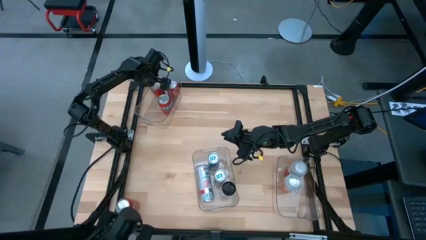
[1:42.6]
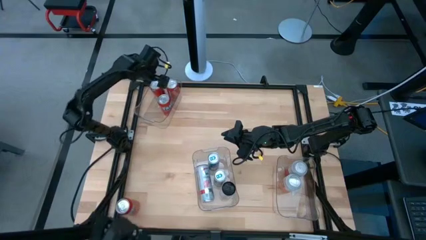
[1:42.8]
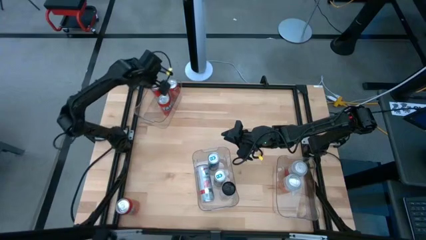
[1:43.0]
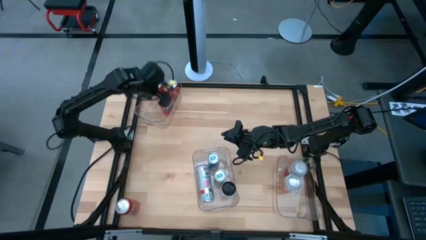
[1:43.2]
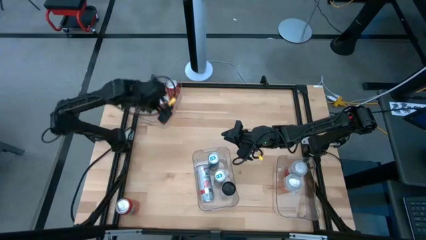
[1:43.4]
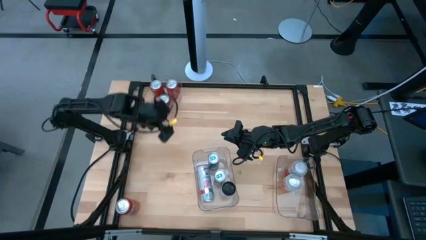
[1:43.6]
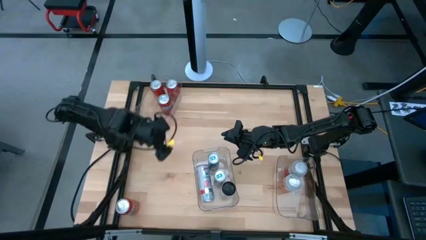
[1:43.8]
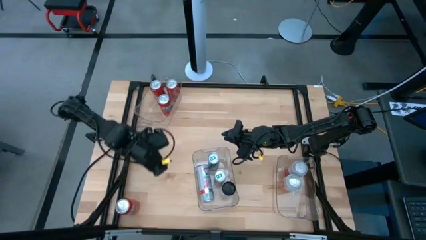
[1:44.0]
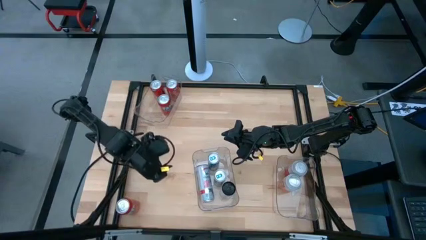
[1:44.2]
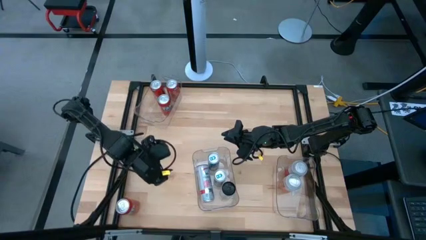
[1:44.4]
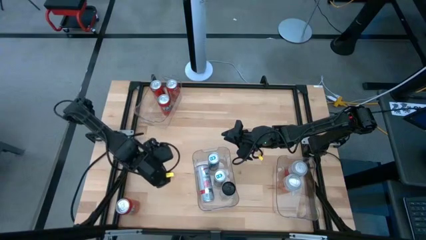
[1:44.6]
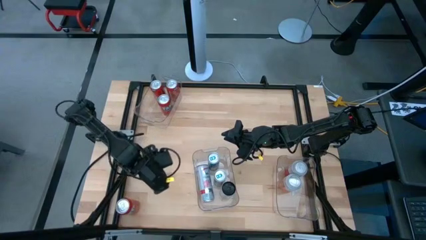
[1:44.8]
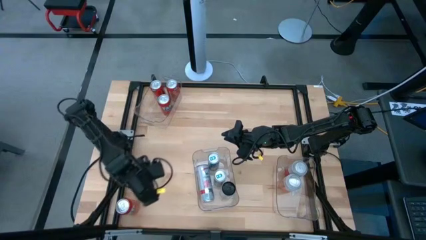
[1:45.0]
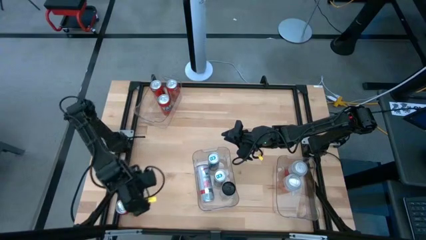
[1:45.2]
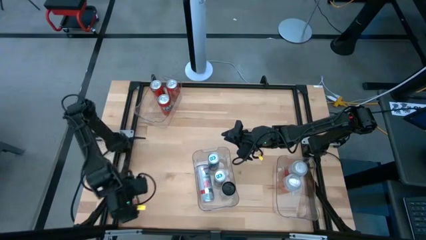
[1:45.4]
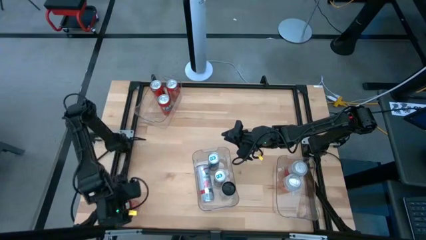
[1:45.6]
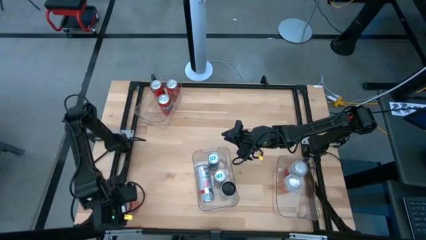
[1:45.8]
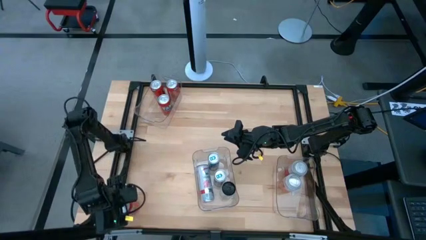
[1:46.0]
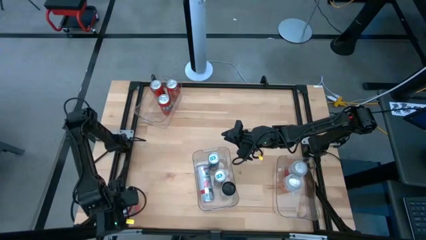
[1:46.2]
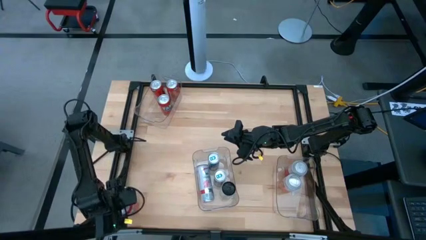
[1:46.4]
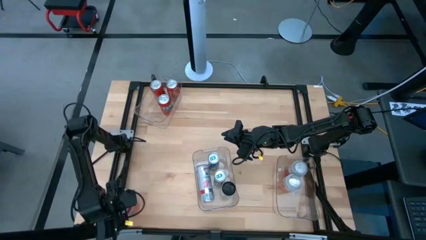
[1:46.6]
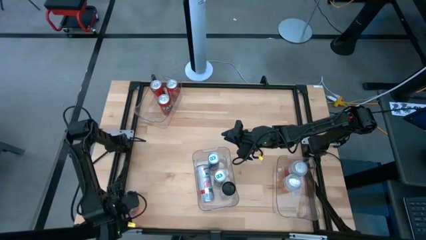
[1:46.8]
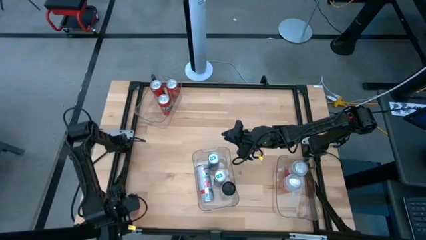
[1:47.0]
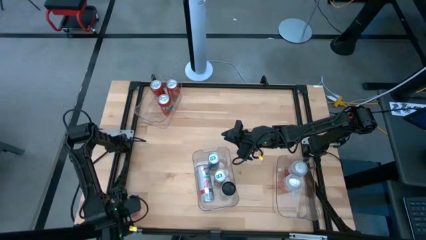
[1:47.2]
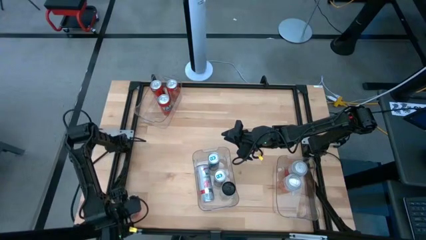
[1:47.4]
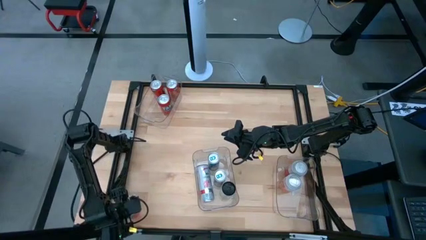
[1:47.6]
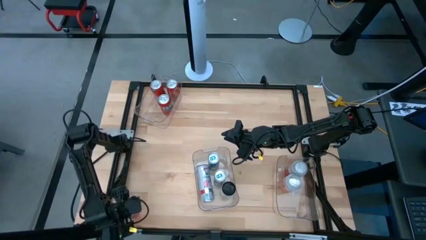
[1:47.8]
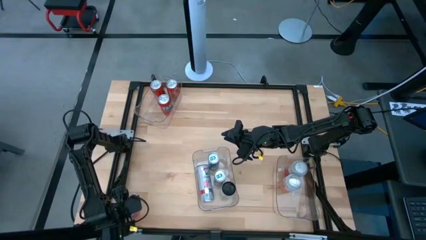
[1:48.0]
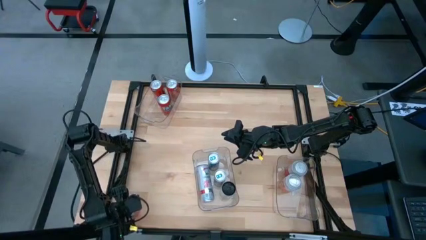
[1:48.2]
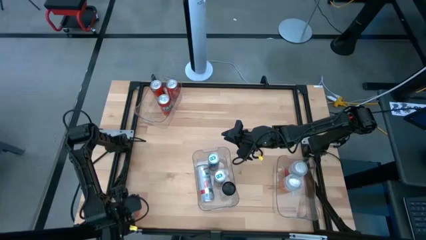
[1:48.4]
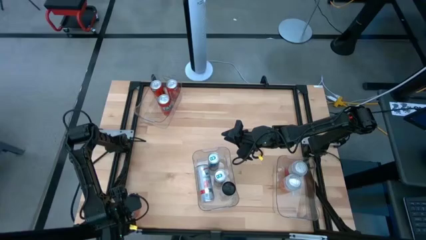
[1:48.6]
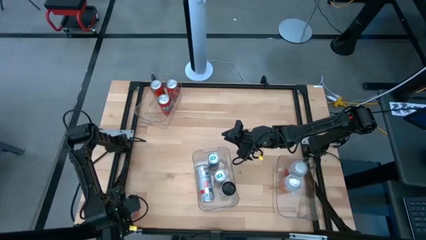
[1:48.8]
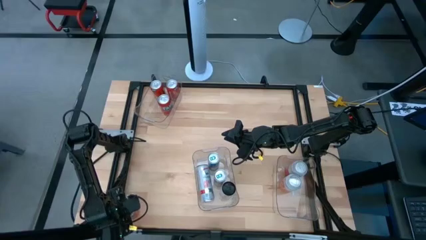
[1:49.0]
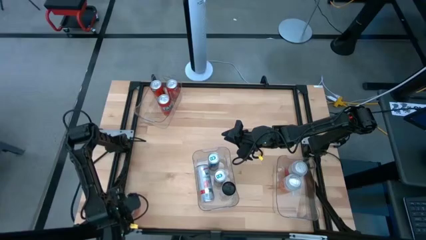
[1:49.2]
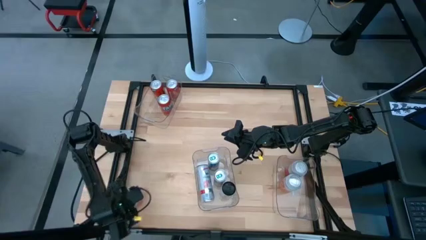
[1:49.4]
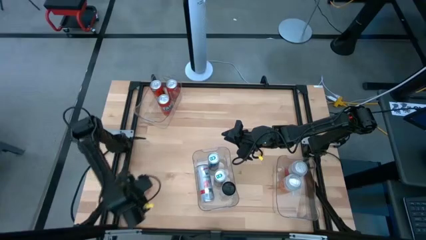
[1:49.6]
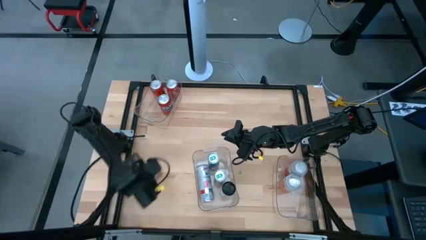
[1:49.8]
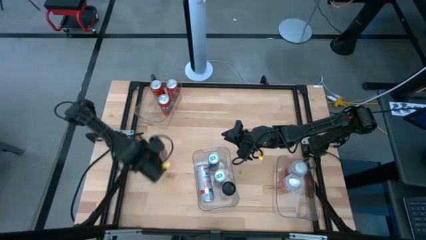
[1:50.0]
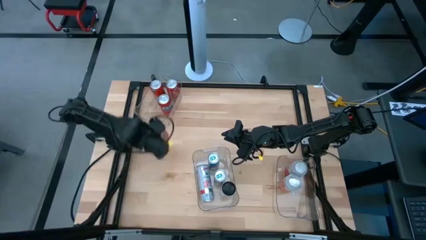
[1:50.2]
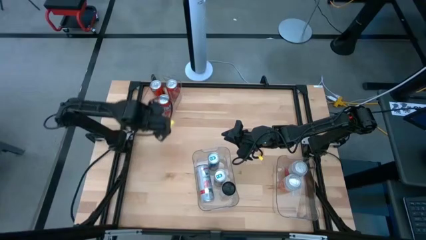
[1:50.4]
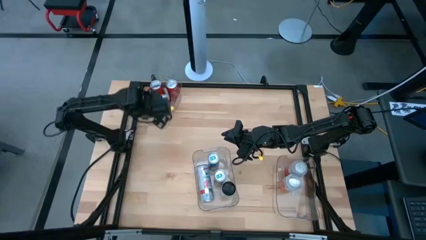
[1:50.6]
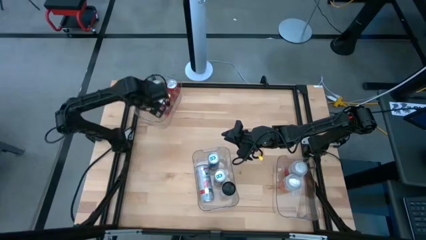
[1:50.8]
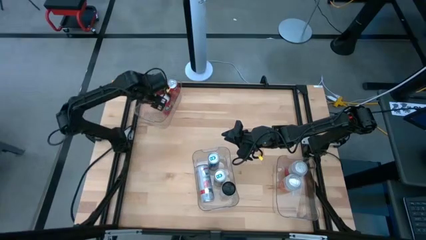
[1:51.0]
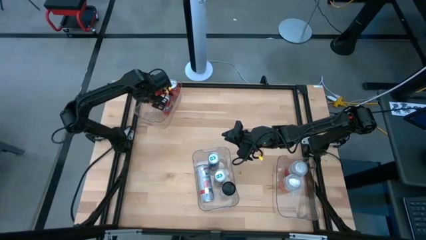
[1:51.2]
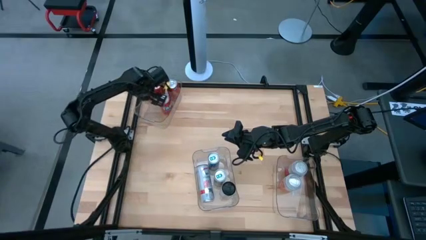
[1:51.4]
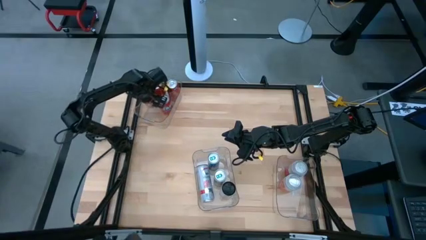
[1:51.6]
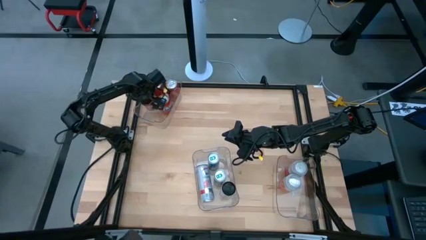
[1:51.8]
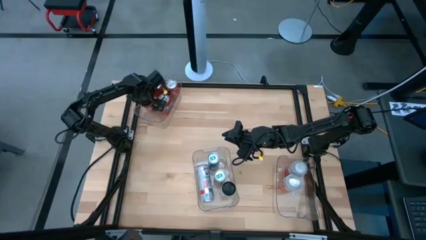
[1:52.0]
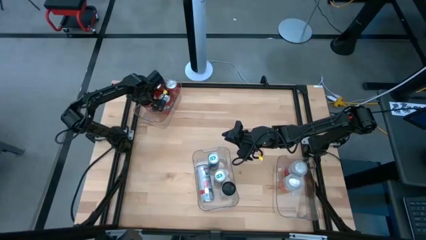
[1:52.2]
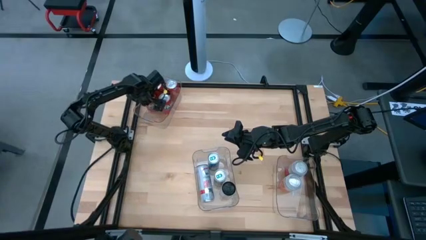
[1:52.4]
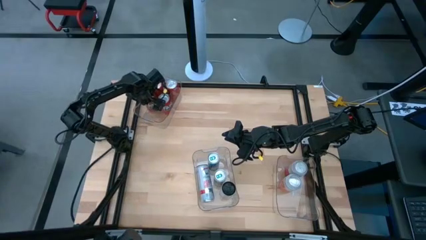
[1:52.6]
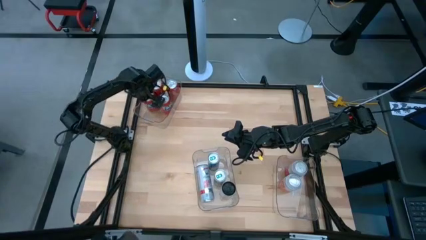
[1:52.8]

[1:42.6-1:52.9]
Task: Sort soda cans
Put the orange soda can into the top transparent bin

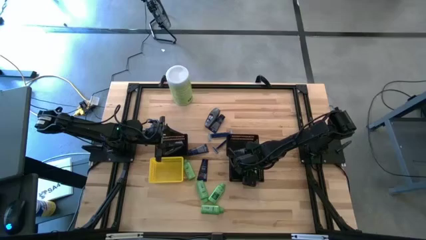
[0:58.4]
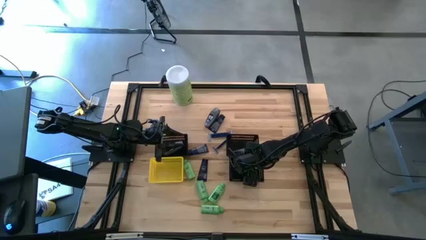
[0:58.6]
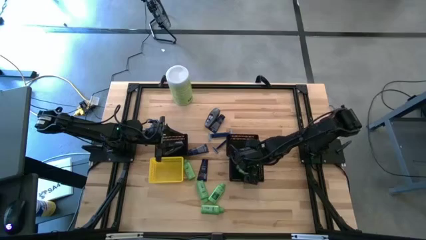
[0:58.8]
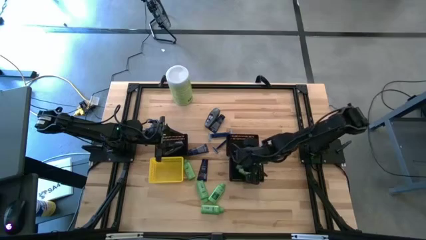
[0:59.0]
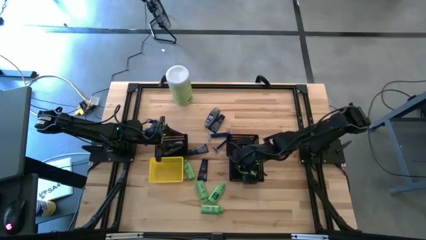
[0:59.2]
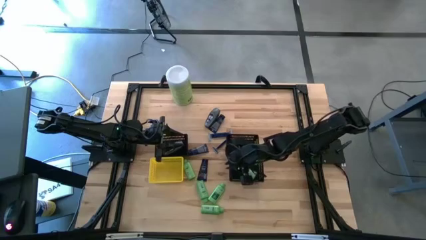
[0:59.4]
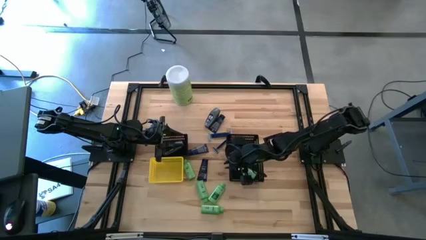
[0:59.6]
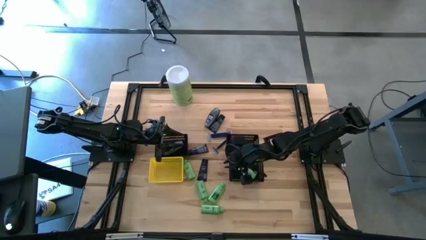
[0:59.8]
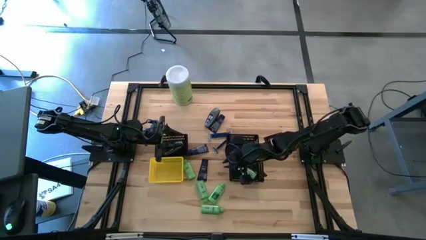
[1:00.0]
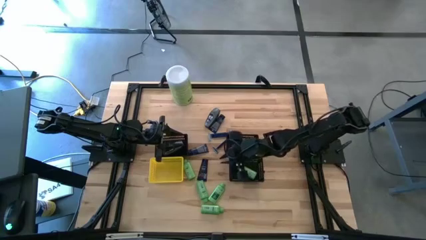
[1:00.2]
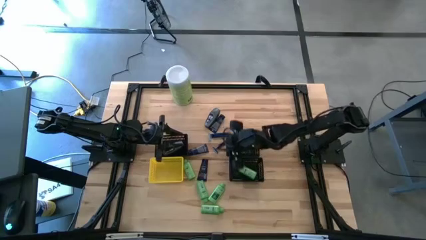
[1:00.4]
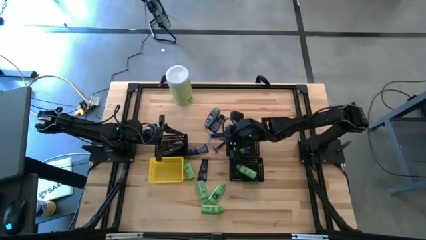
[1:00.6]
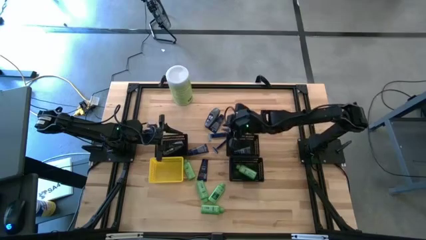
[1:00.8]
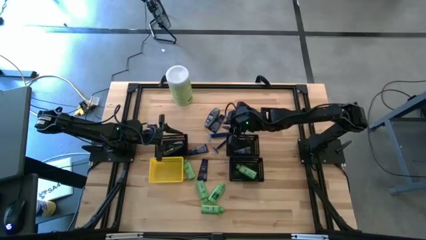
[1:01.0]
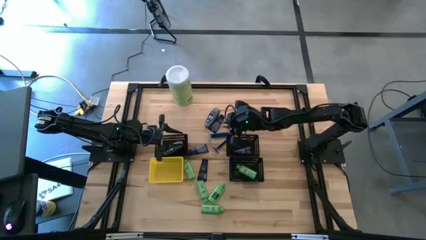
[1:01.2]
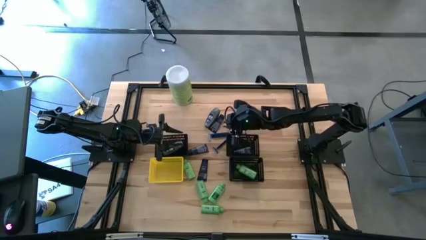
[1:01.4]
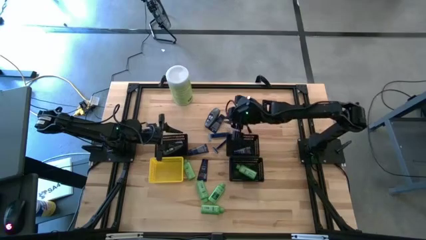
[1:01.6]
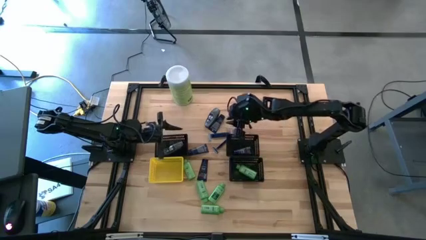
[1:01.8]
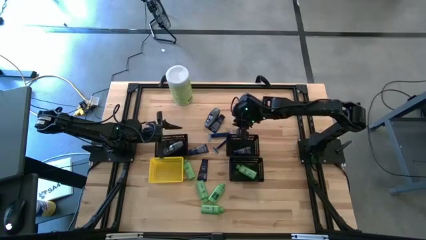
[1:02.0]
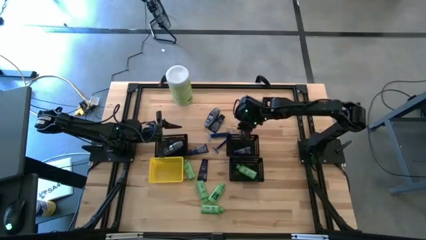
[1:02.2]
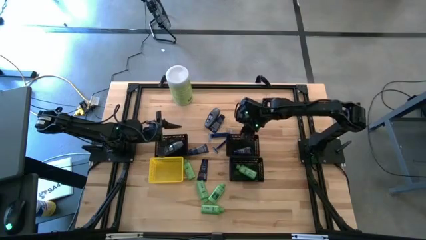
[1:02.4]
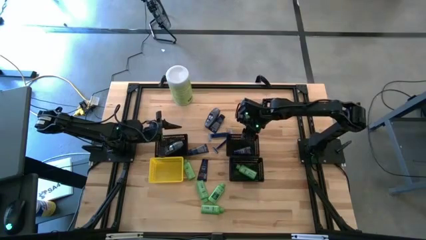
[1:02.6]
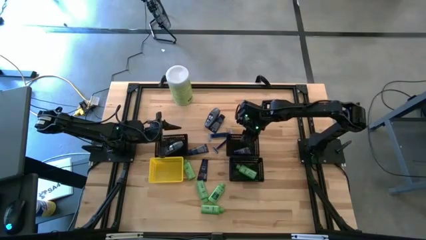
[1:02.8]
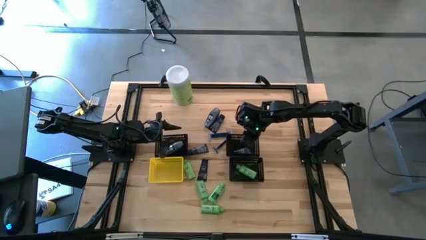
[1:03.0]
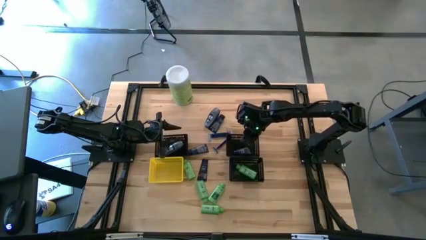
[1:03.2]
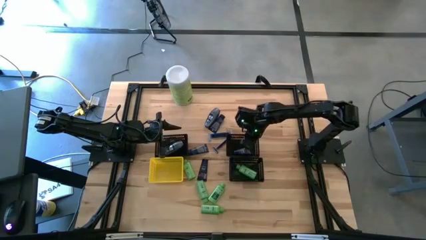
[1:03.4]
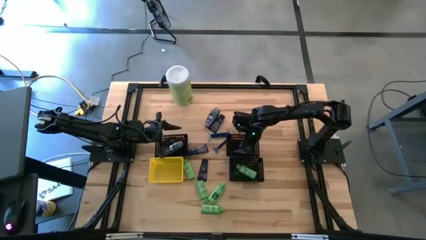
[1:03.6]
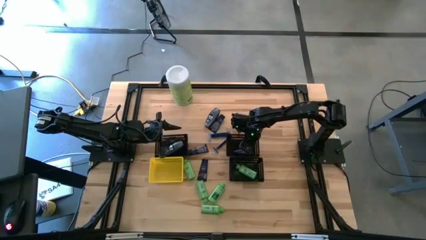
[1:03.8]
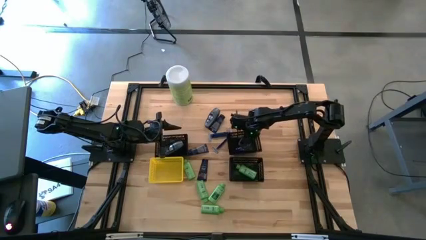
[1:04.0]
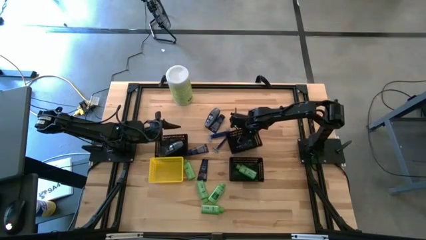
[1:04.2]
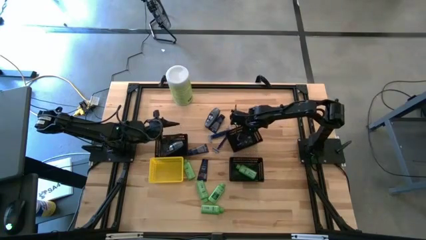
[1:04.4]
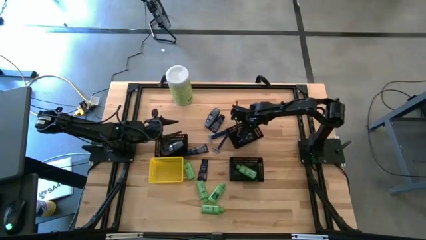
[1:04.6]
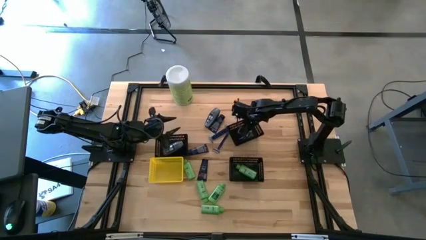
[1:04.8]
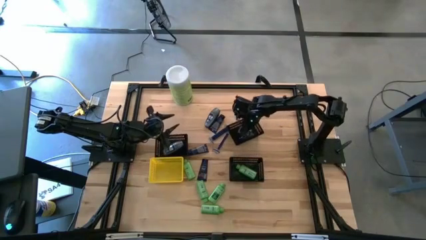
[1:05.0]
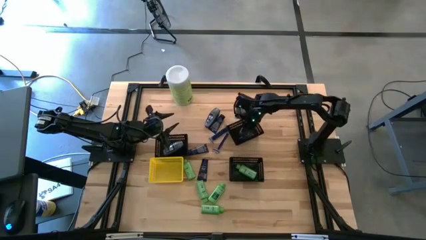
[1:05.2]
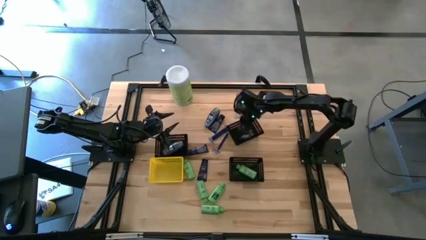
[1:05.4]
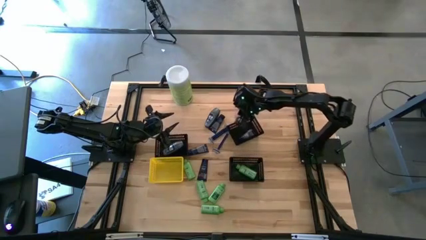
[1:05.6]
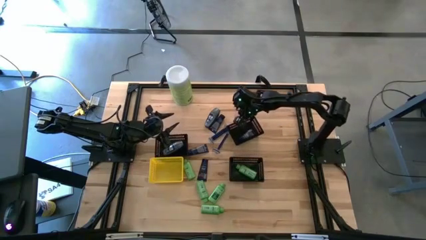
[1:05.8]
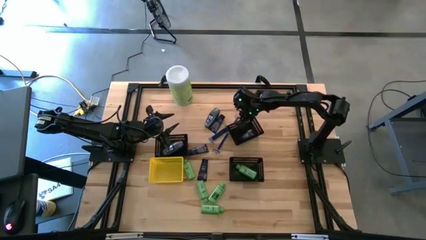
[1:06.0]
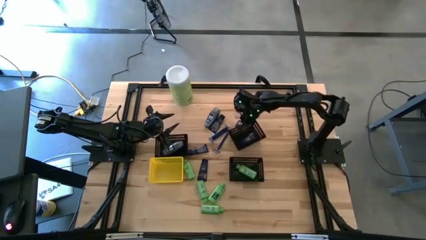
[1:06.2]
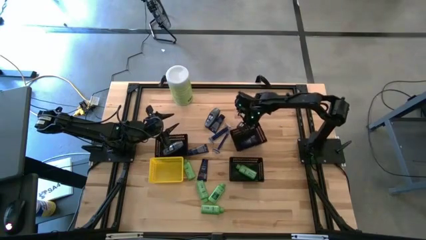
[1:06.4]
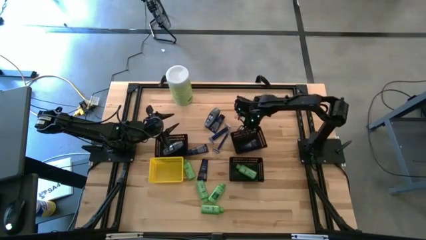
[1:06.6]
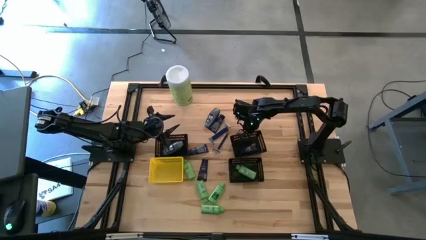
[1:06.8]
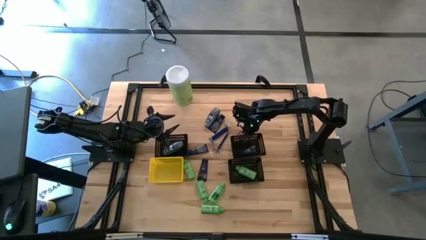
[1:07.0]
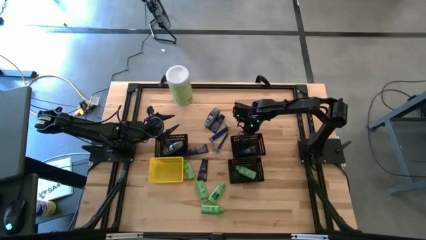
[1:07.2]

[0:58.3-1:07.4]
Task: Pick & Place Travel size toiletries
Adjust the top right black bin
